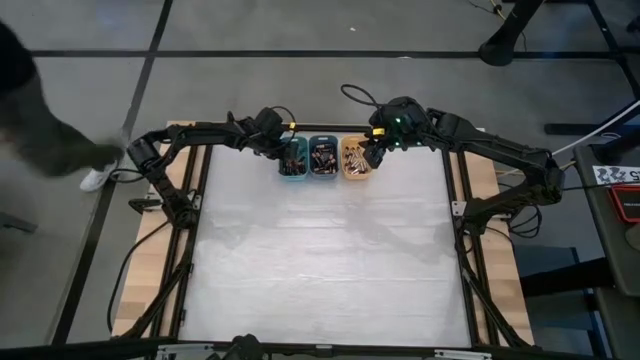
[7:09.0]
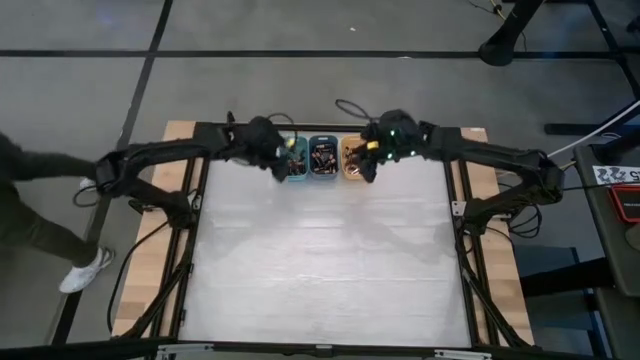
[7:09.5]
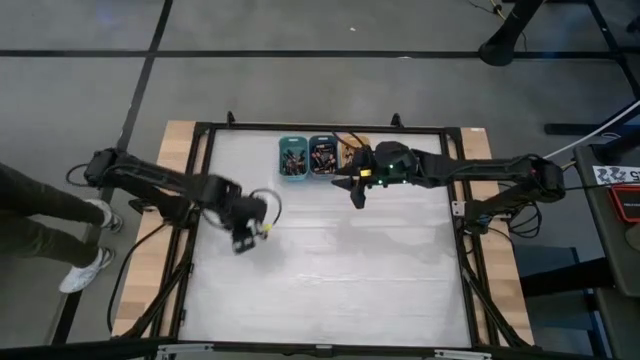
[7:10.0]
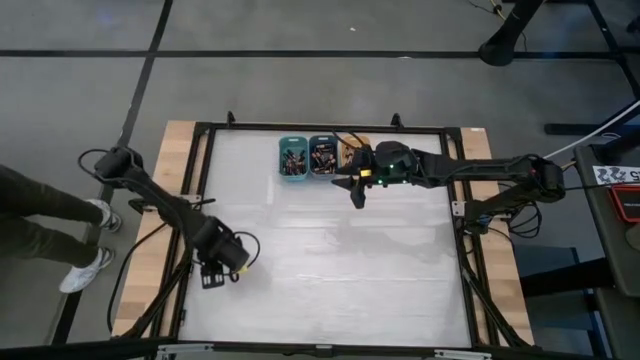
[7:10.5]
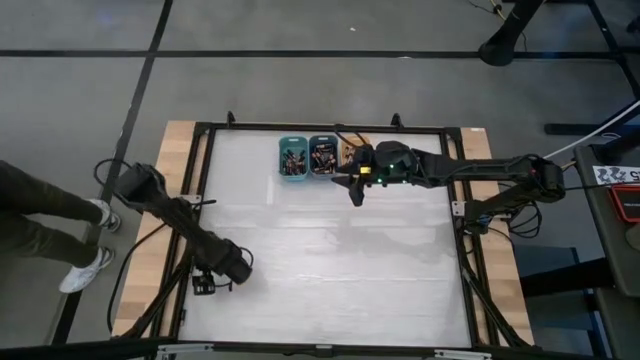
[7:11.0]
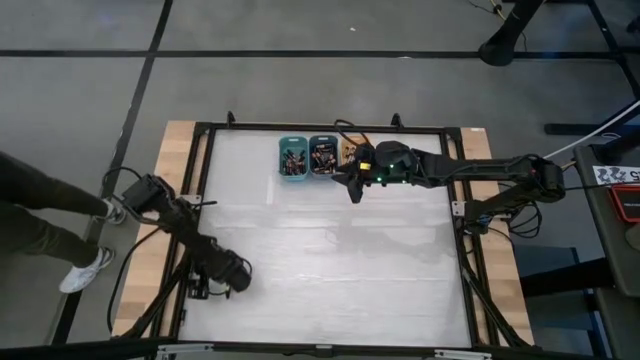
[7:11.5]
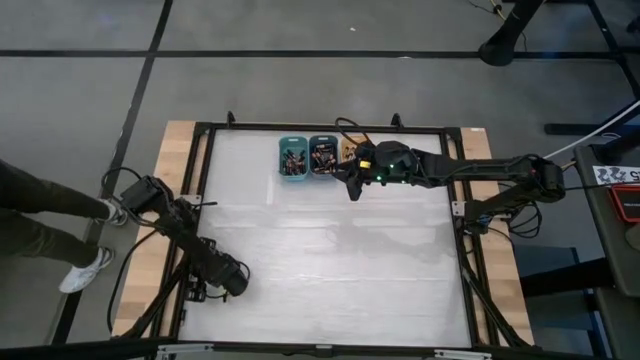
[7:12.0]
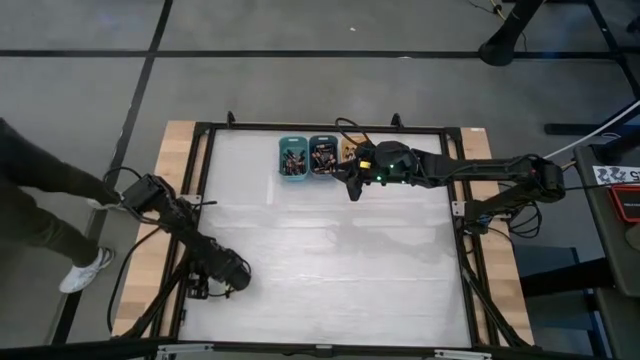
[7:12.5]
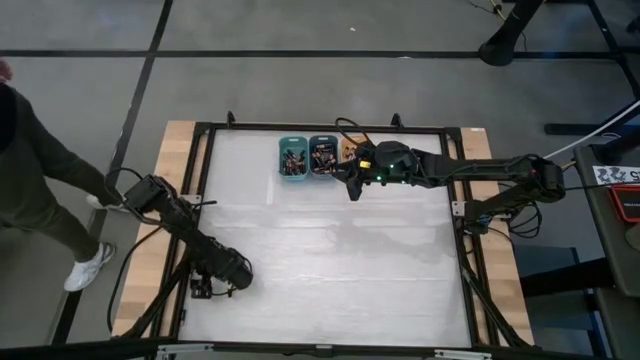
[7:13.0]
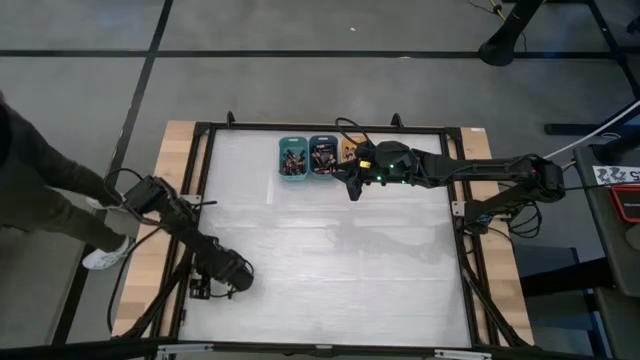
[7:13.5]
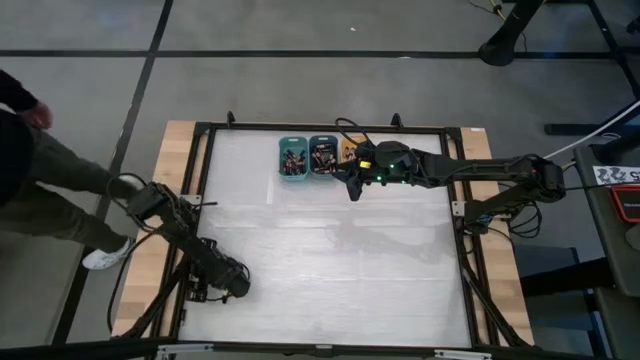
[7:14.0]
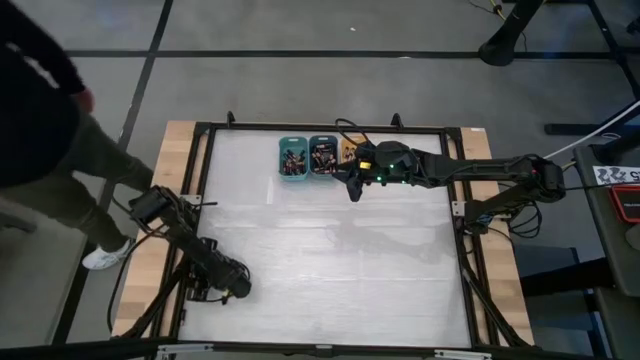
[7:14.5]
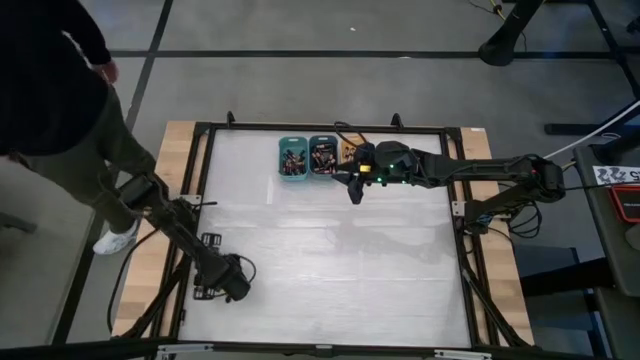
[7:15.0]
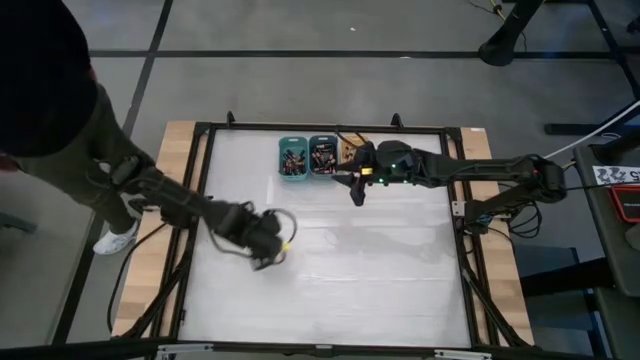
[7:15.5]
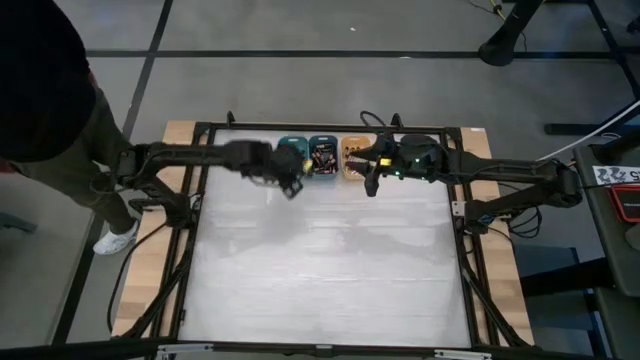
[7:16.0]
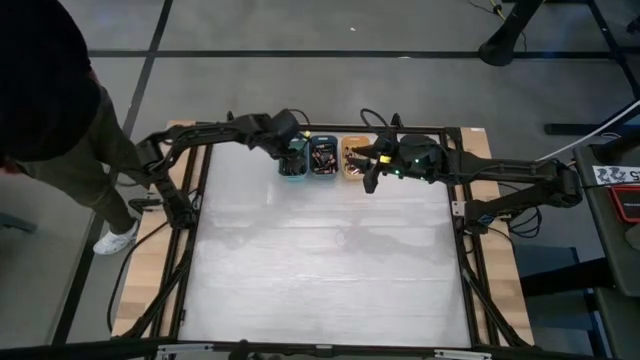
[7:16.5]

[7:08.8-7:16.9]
Task: Sort batteries
Put the brown battery into the green bin

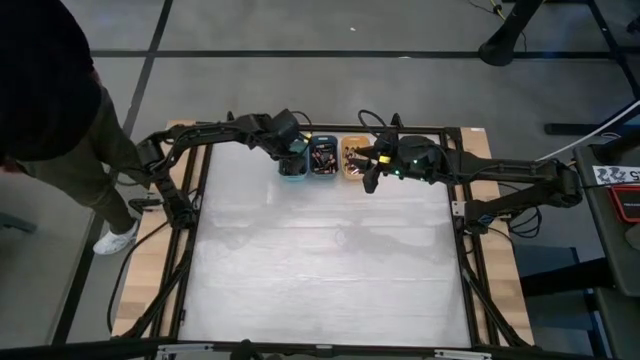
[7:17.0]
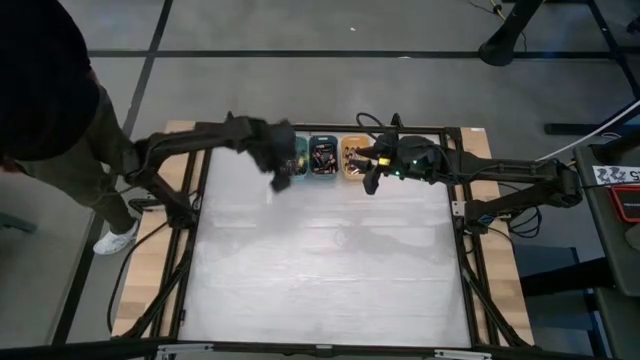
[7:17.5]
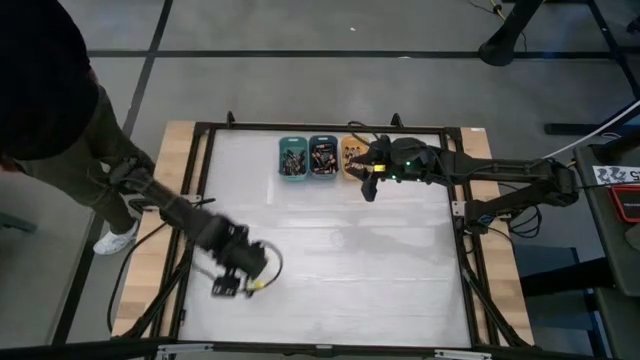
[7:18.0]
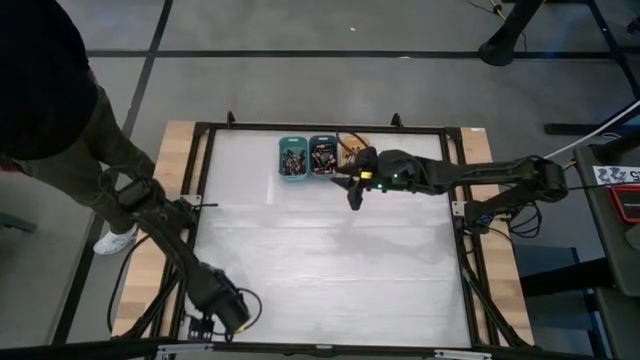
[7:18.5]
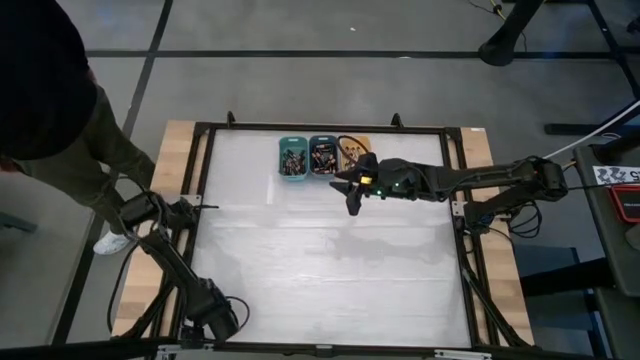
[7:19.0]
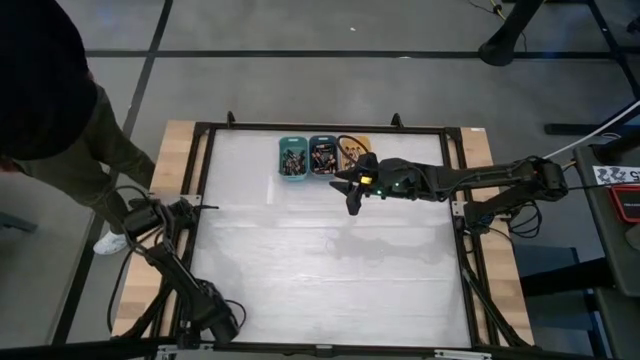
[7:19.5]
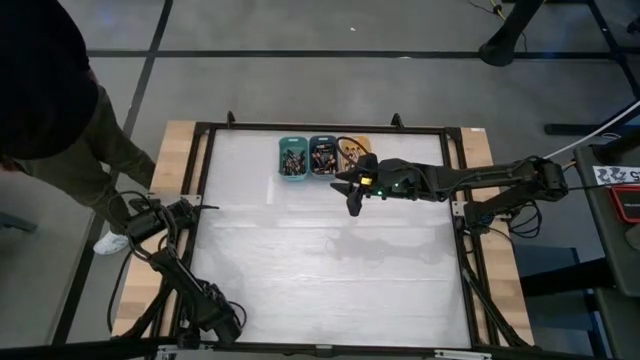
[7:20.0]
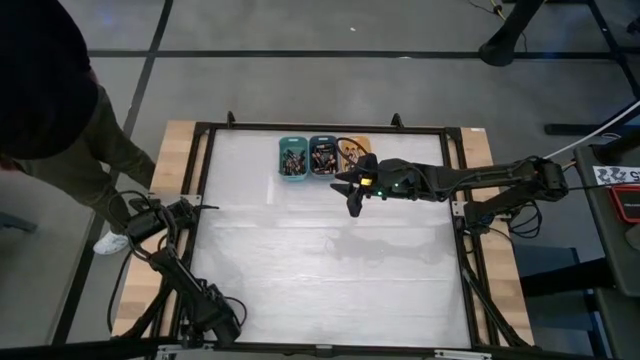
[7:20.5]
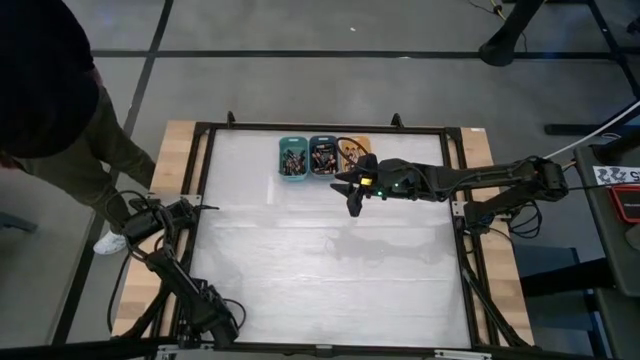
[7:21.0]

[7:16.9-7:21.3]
Put the brown battery into the green bin

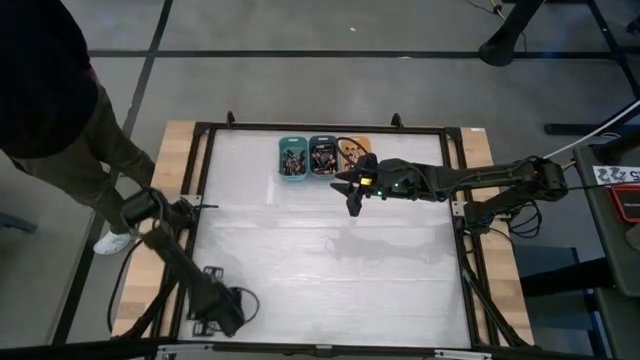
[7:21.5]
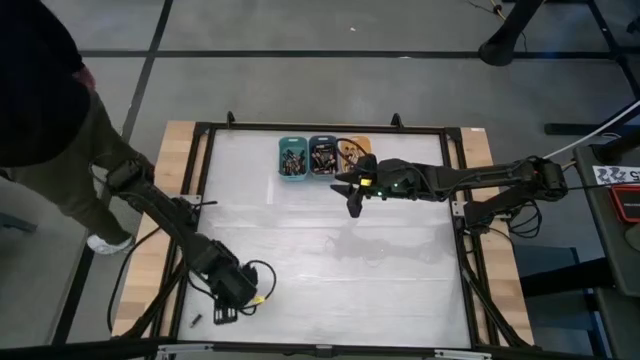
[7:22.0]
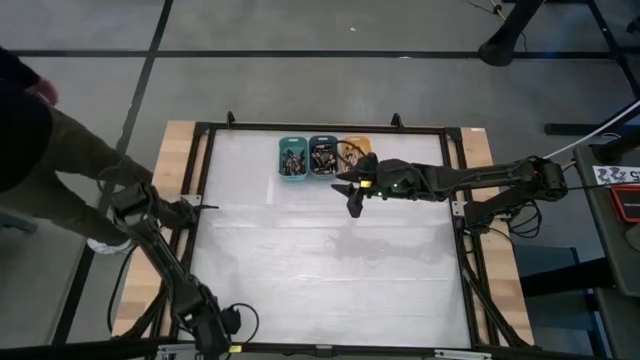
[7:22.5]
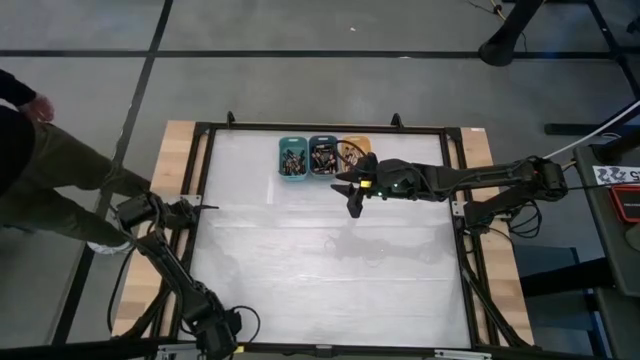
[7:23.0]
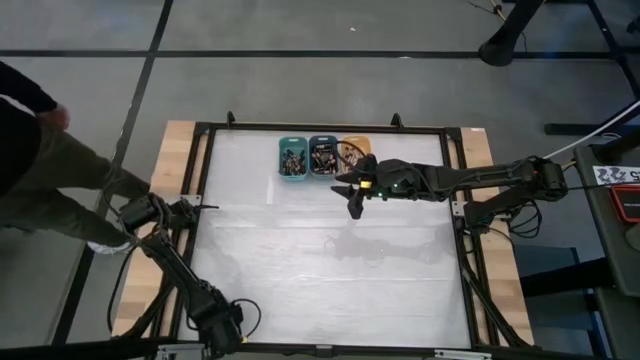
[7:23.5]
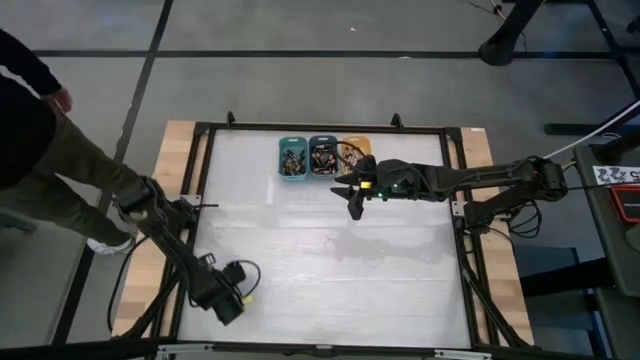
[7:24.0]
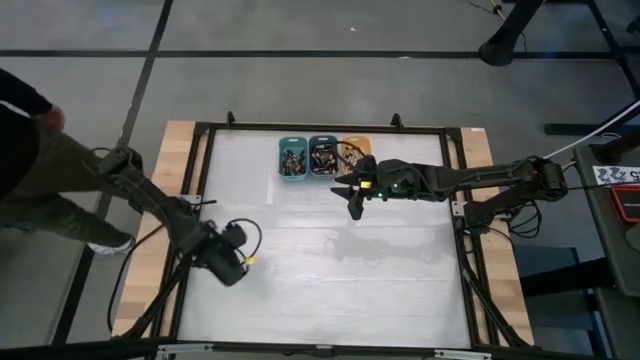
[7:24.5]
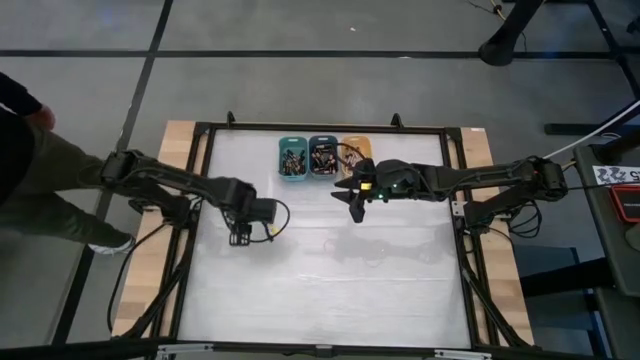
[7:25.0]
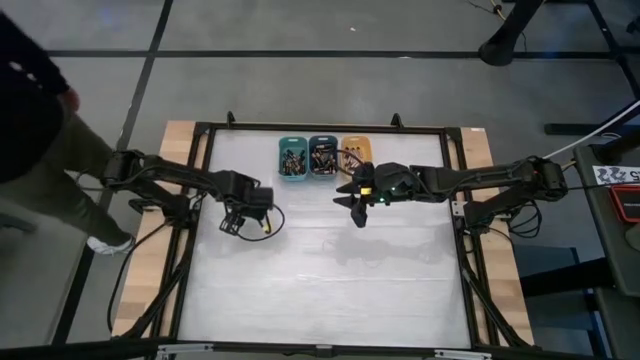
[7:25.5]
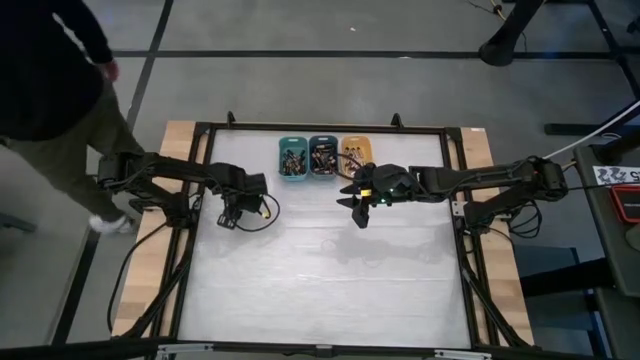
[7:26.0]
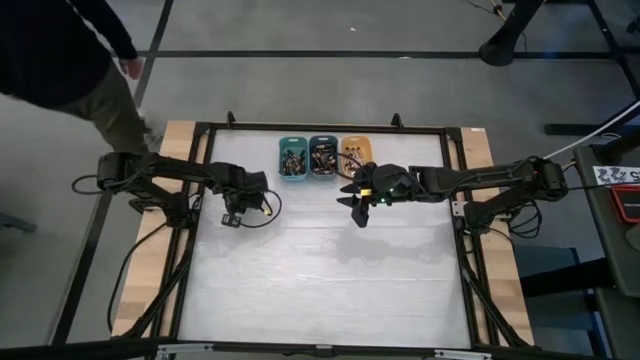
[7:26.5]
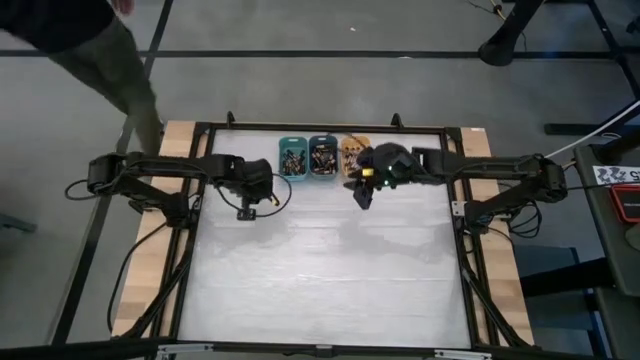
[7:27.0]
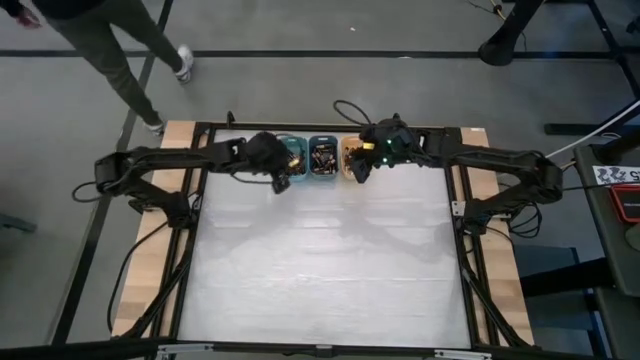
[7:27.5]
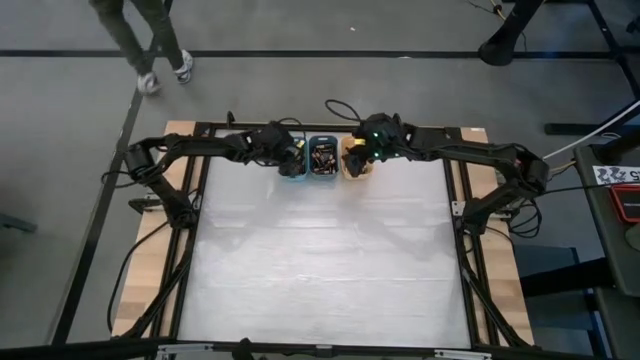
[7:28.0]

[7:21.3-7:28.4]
Put the brown battery into the green bin
